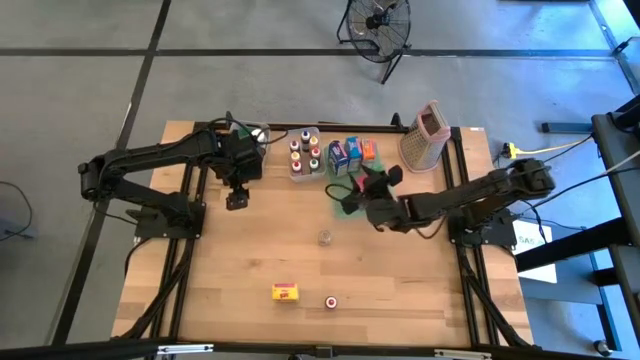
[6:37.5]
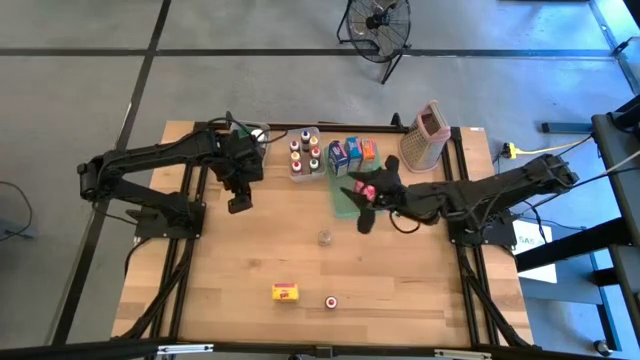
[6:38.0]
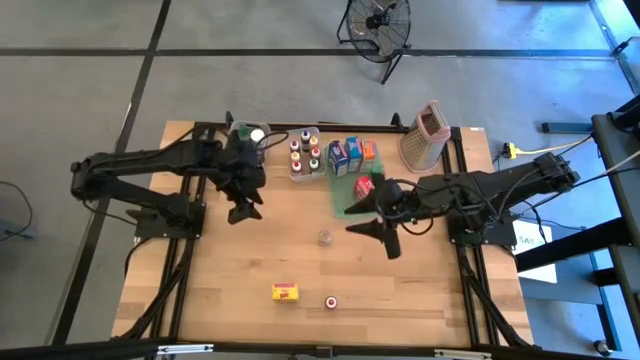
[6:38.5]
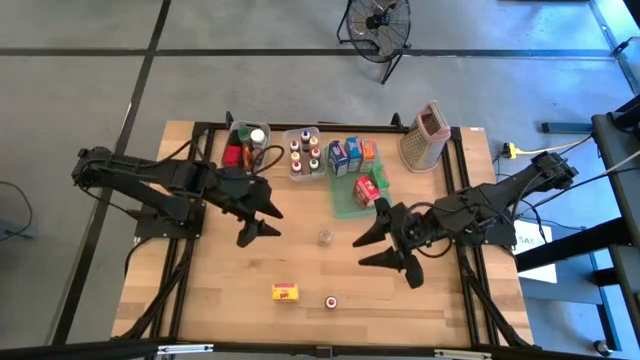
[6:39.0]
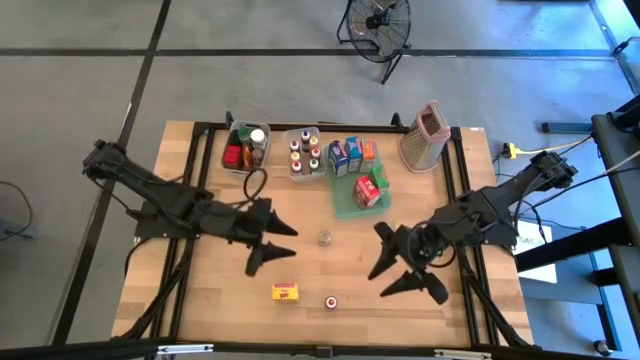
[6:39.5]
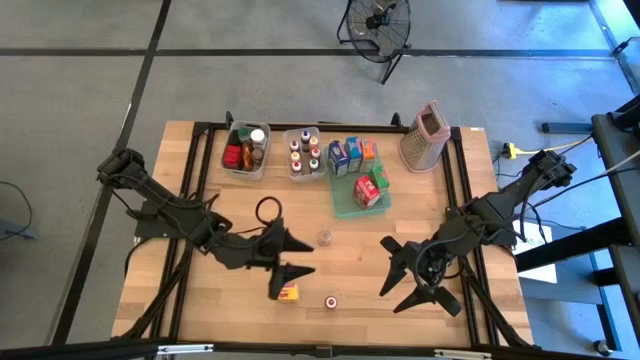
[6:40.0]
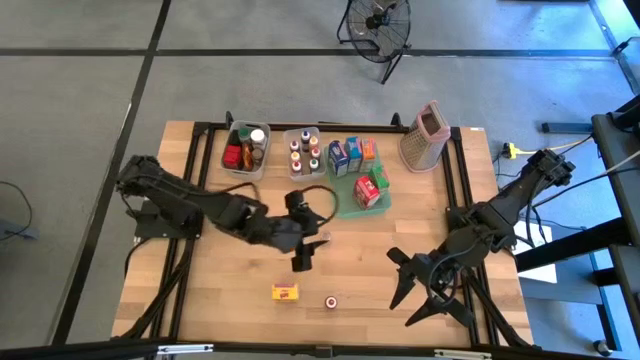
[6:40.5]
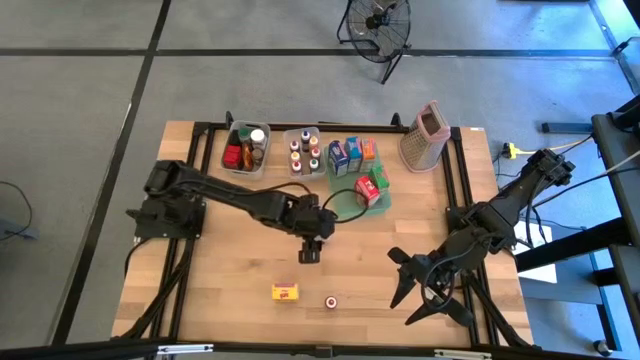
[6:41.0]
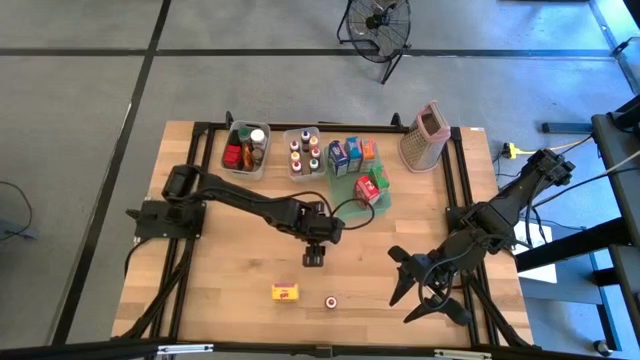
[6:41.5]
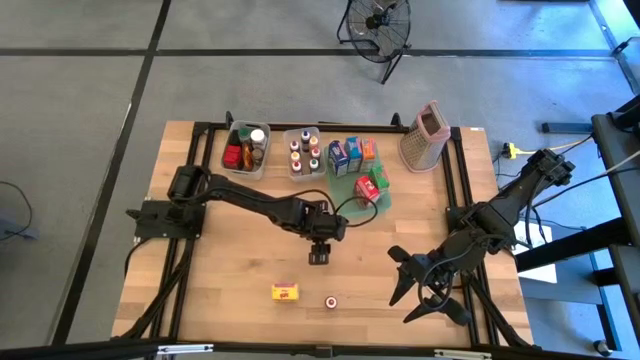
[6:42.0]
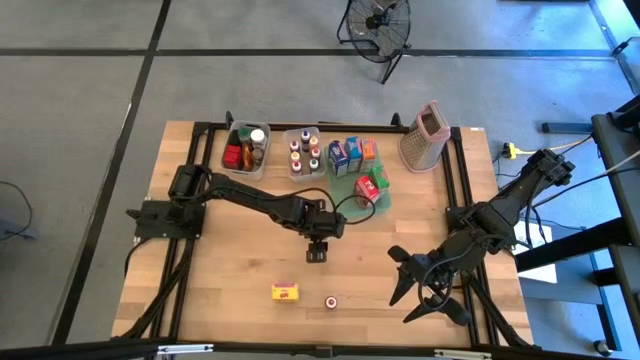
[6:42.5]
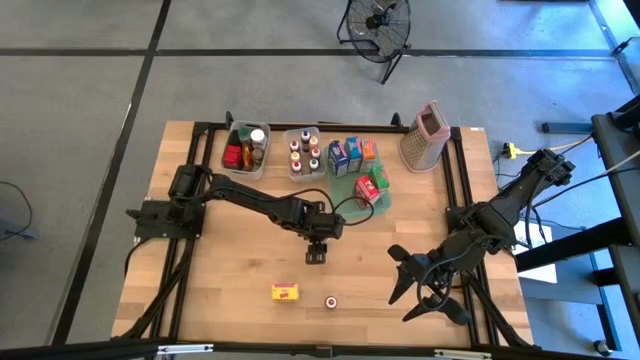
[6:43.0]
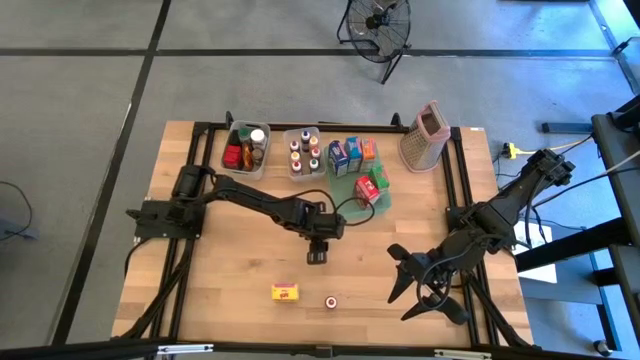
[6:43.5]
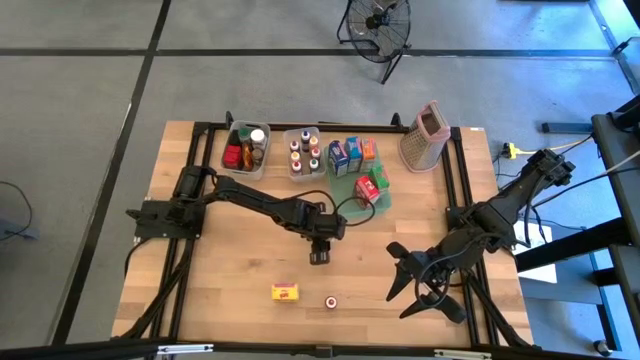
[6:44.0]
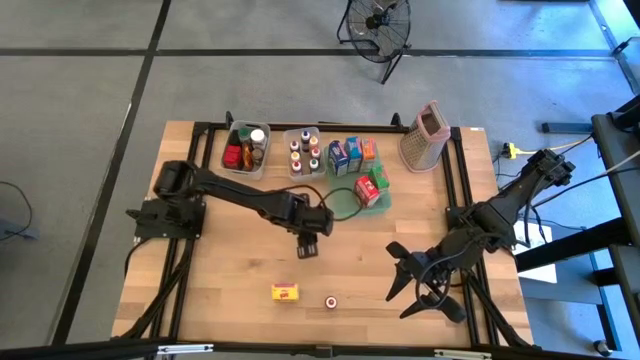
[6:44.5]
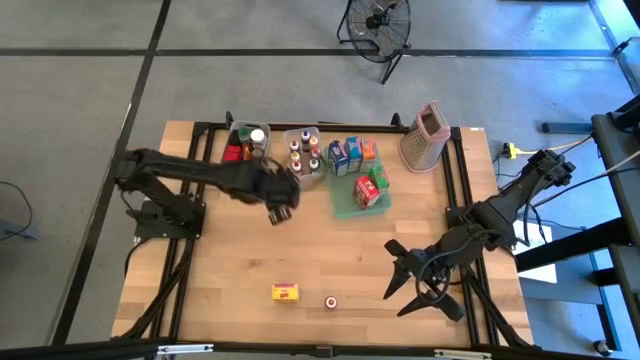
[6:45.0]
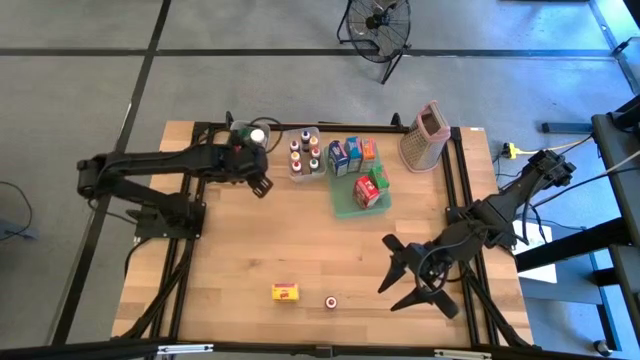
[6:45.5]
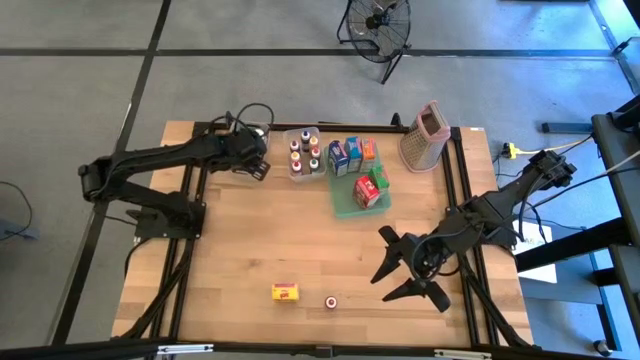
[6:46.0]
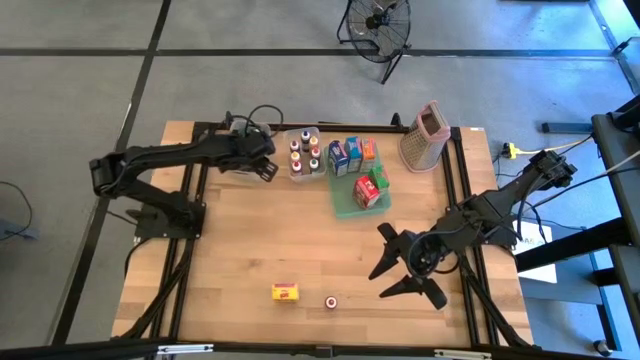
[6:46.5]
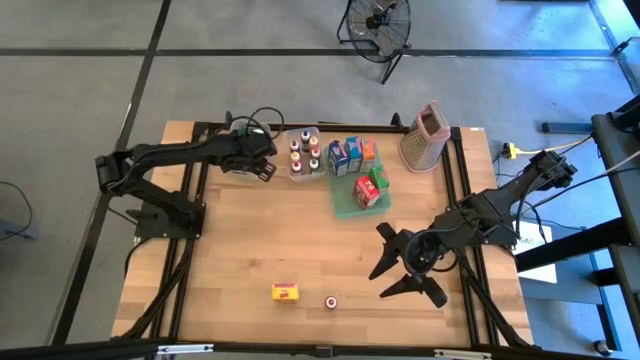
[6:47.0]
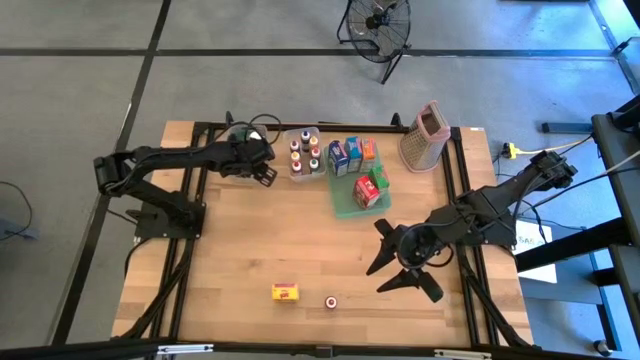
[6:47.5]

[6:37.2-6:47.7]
Task: Pick & Place Kitchen Items
Put the transparent spice bottle into the gray bin

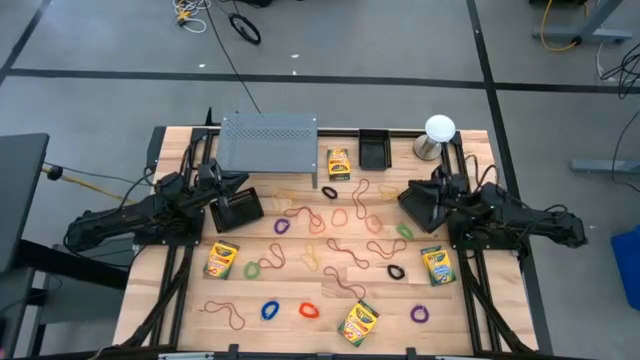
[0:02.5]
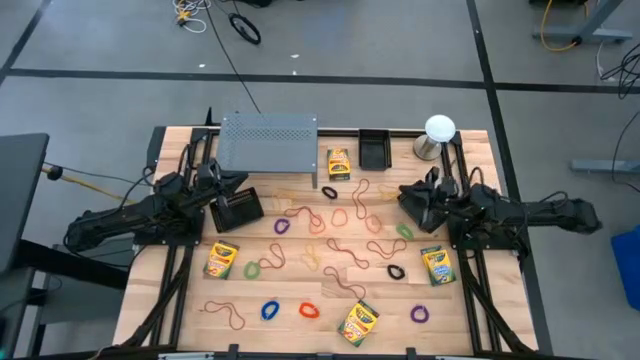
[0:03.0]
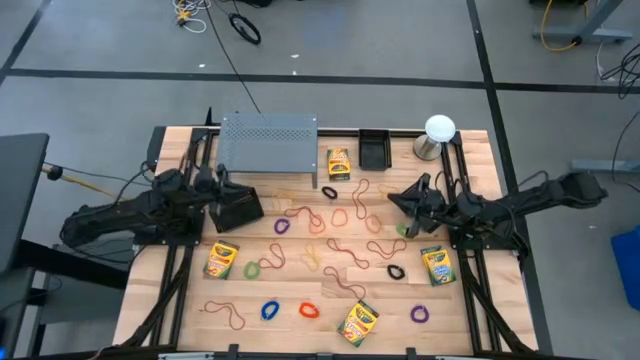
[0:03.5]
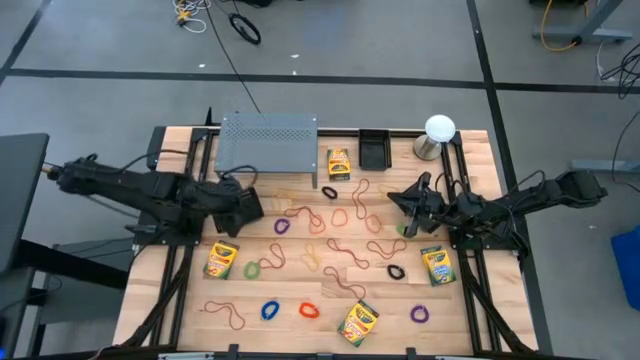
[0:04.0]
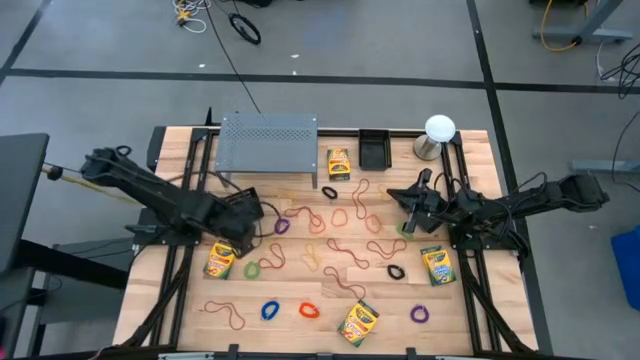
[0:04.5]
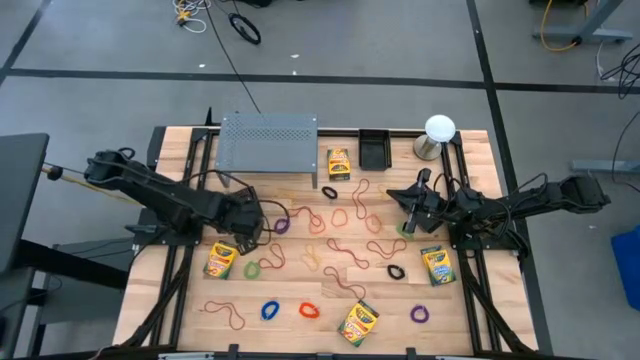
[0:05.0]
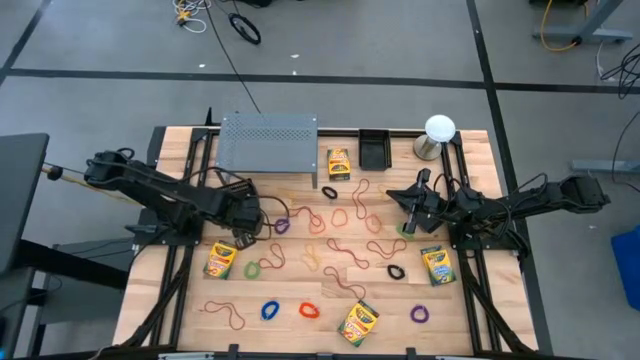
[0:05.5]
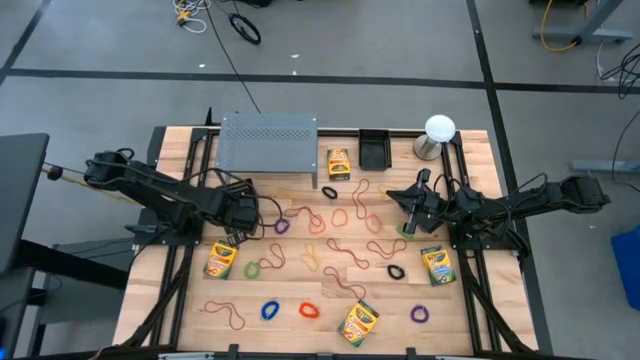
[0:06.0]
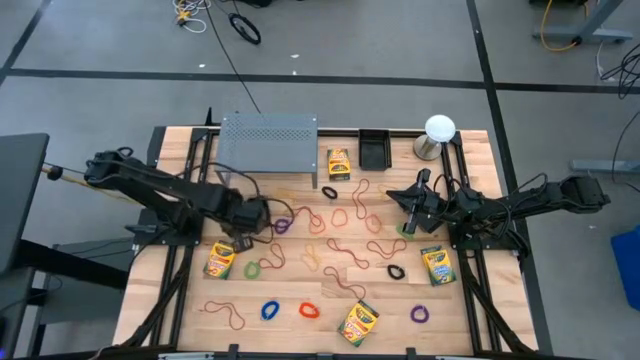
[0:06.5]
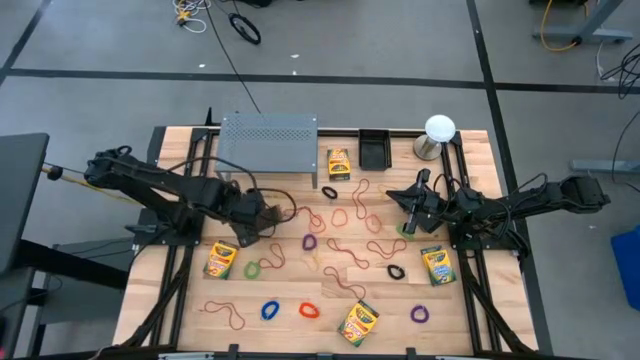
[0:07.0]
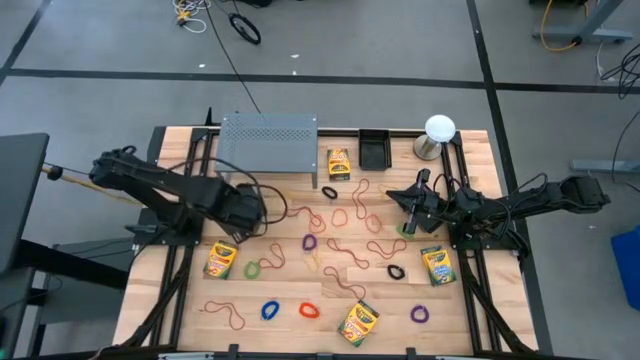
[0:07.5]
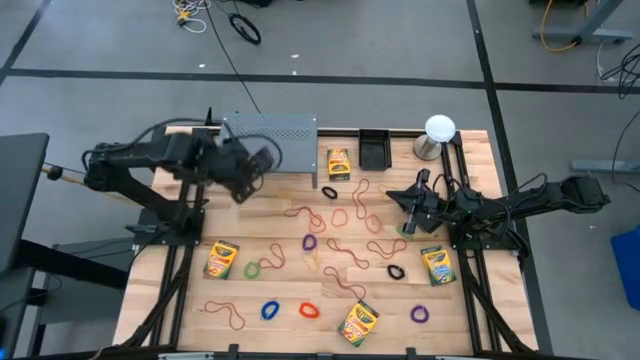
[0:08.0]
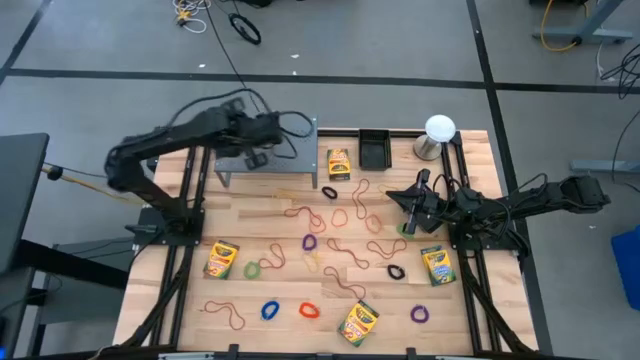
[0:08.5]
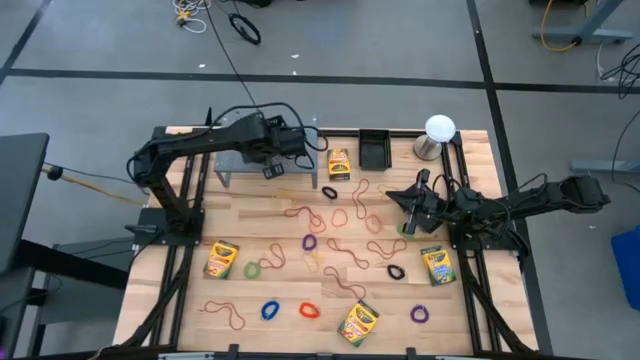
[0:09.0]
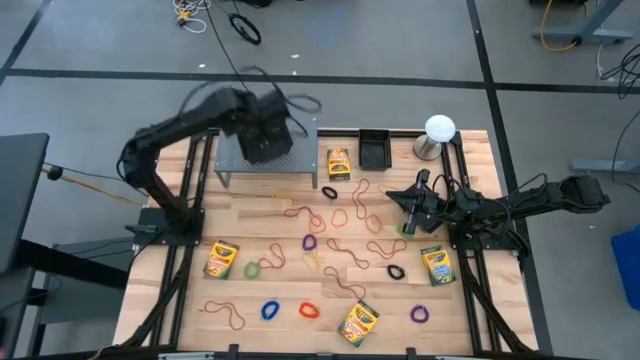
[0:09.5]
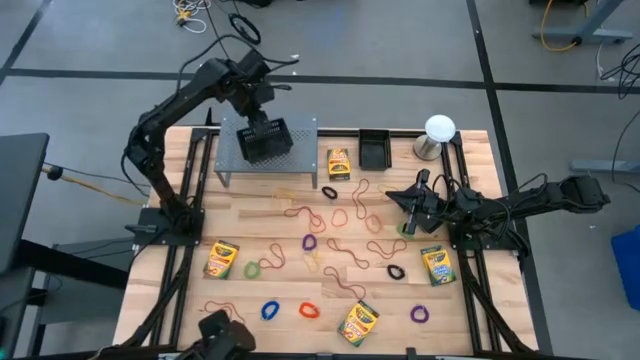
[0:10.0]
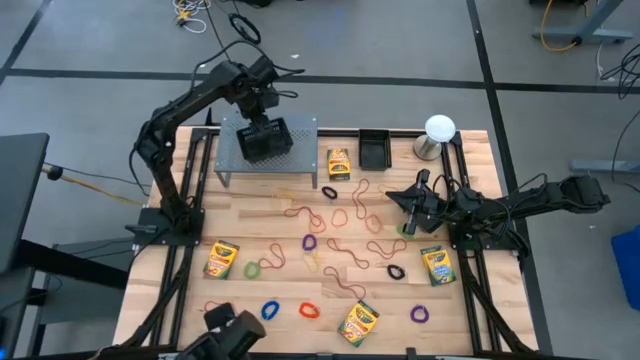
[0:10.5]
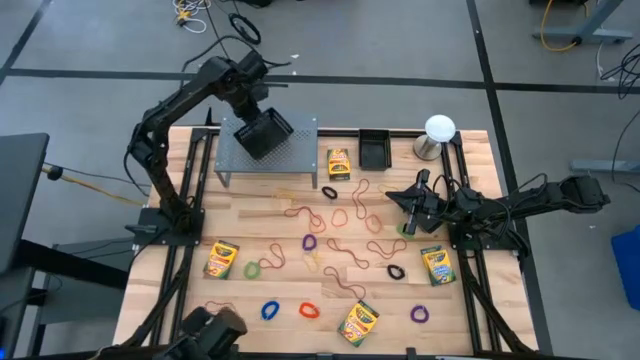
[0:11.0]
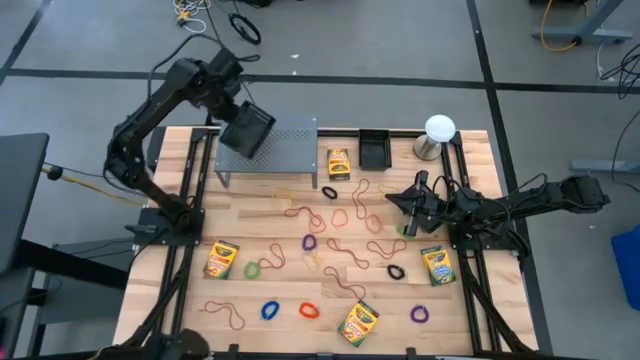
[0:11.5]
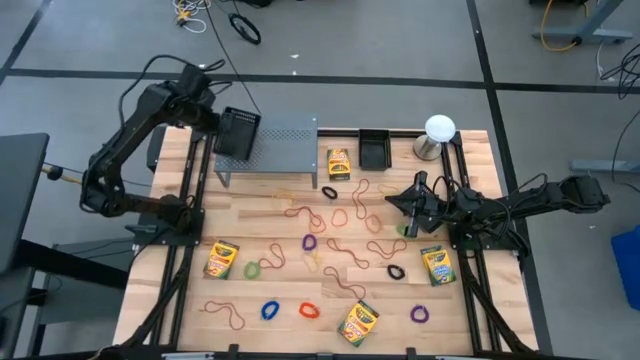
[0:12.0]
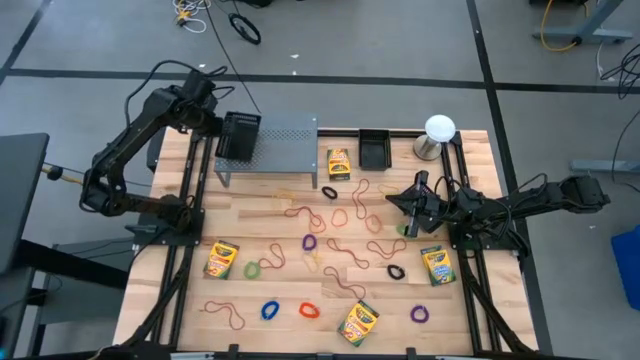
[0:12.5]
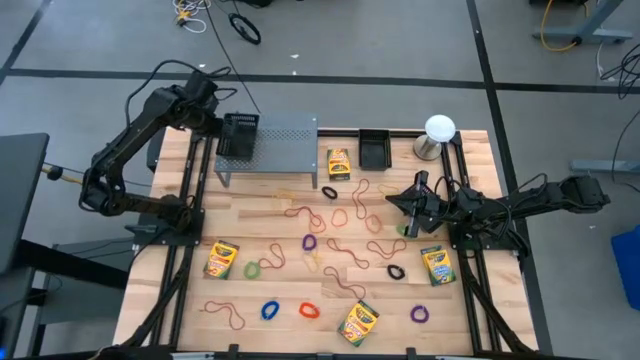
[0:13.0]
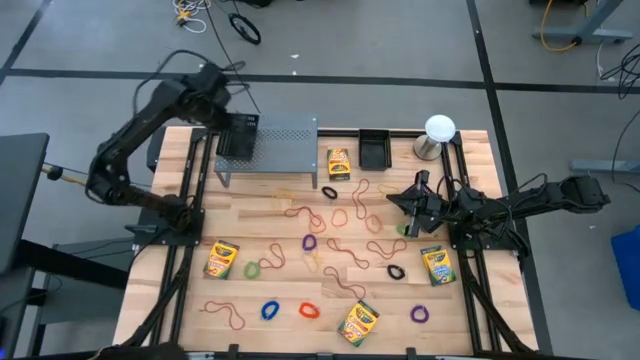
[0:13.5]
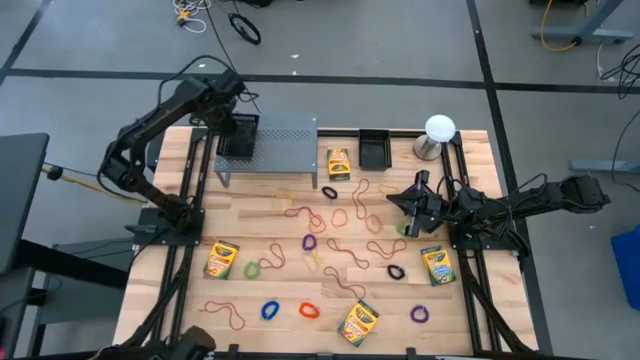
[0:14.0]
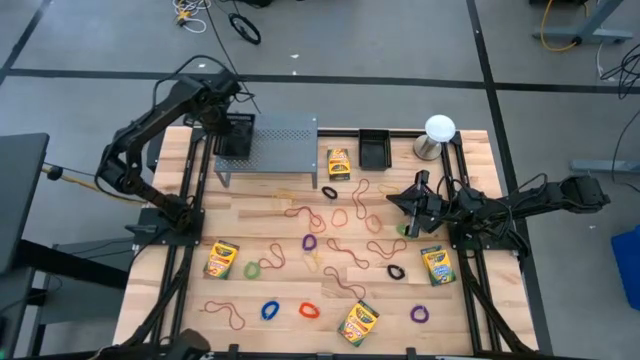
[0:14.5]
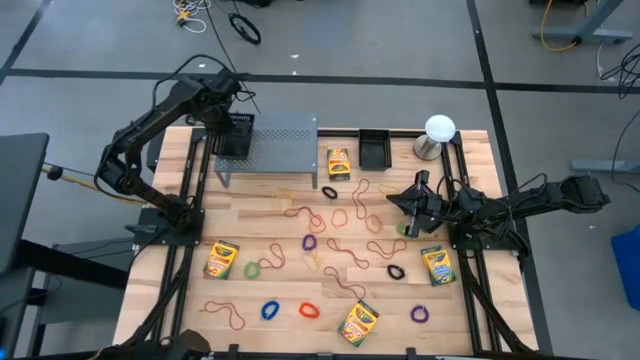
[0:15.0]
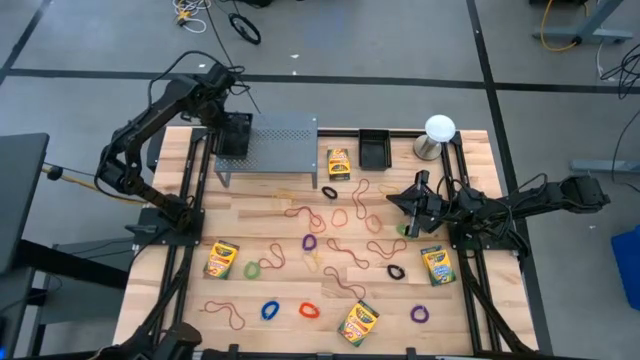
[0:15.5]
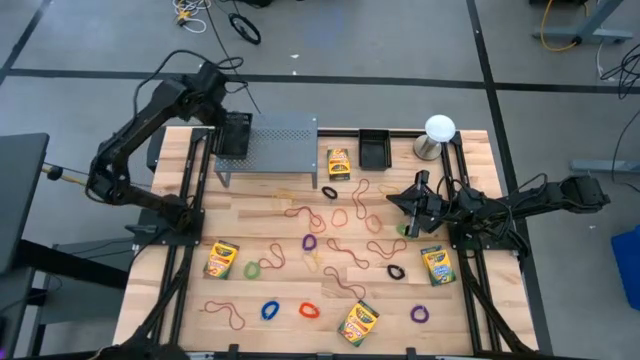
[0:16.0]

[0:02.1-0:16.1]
Task: Pick & Place Office Desk Supplies
Put the left black bin on the shelf
